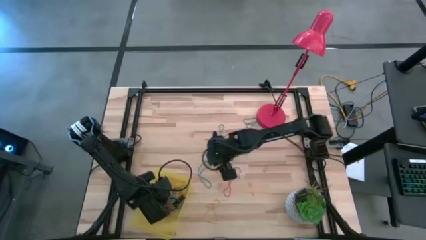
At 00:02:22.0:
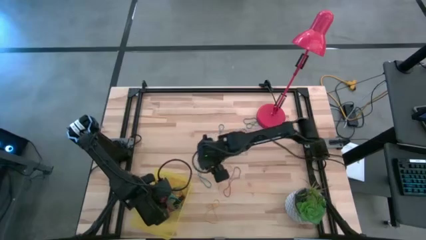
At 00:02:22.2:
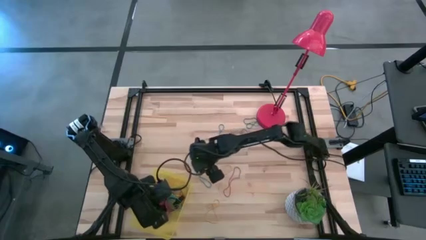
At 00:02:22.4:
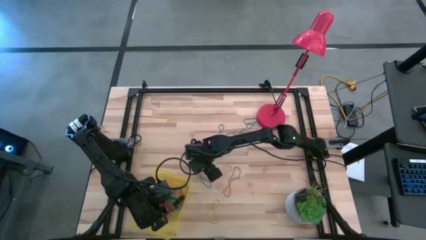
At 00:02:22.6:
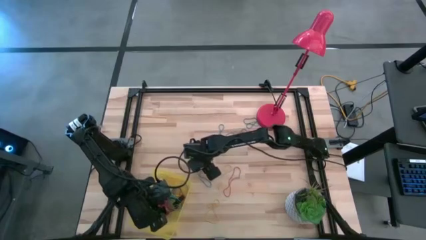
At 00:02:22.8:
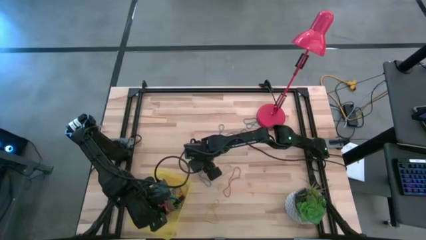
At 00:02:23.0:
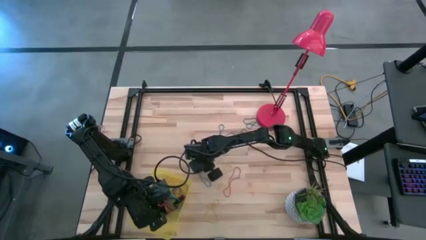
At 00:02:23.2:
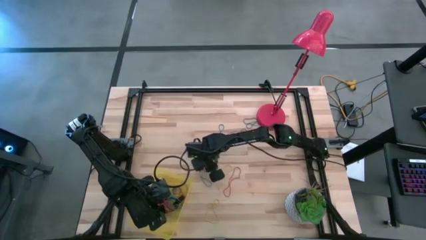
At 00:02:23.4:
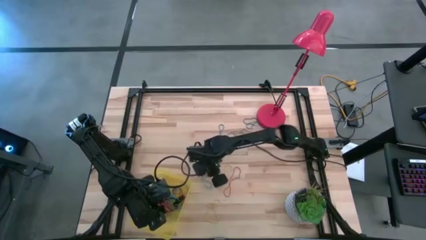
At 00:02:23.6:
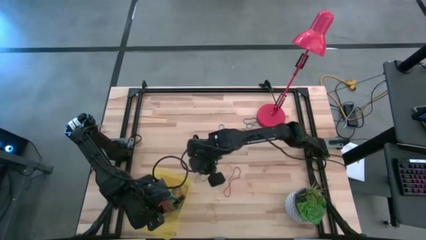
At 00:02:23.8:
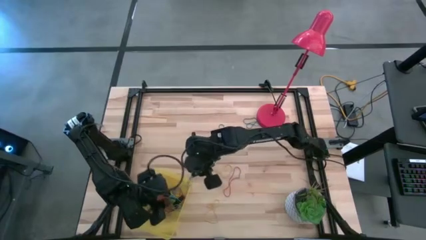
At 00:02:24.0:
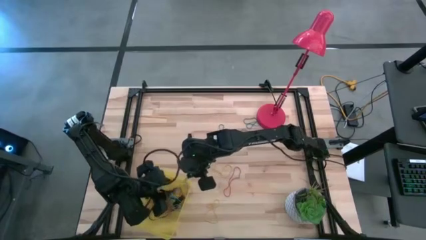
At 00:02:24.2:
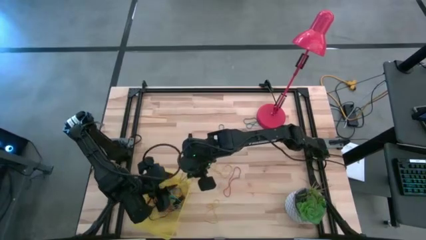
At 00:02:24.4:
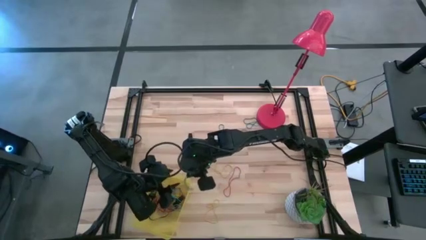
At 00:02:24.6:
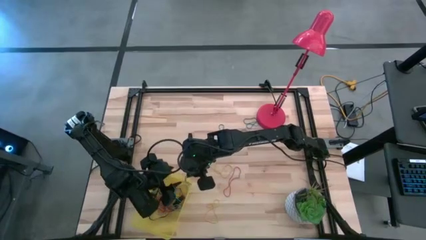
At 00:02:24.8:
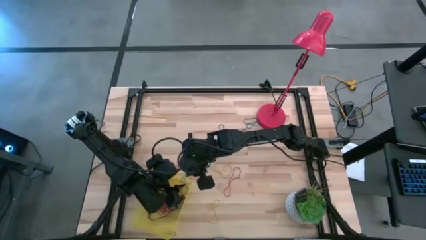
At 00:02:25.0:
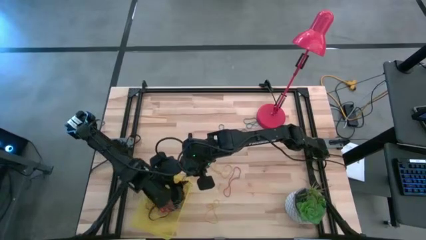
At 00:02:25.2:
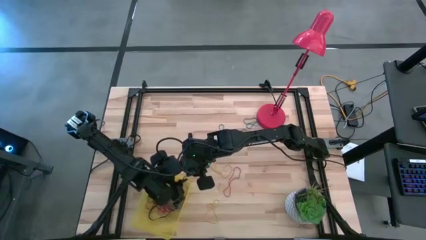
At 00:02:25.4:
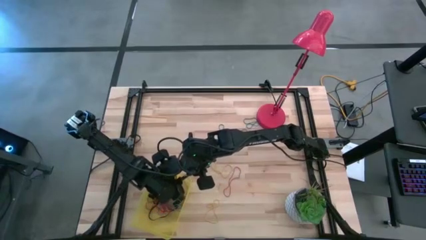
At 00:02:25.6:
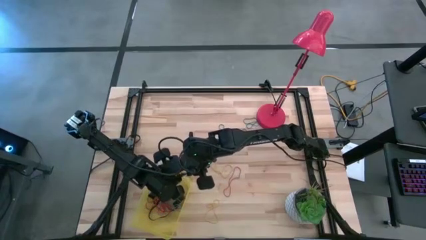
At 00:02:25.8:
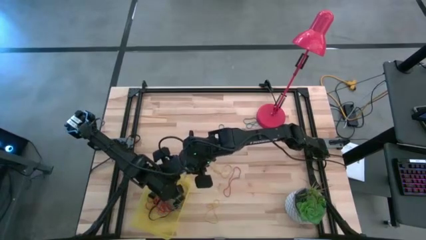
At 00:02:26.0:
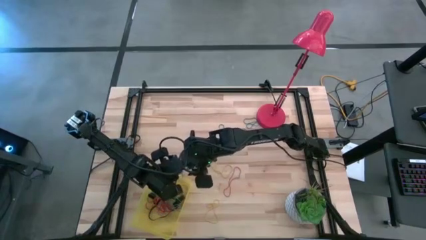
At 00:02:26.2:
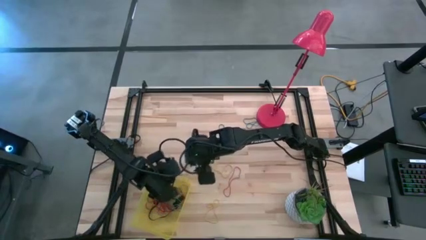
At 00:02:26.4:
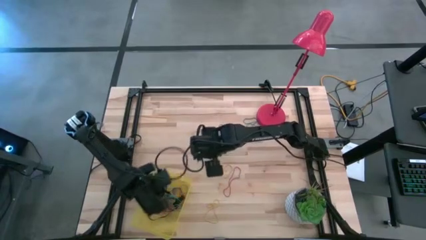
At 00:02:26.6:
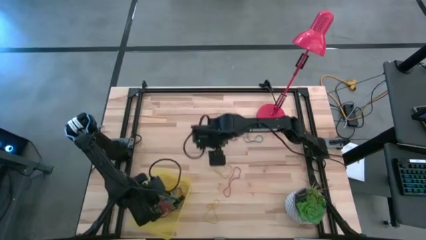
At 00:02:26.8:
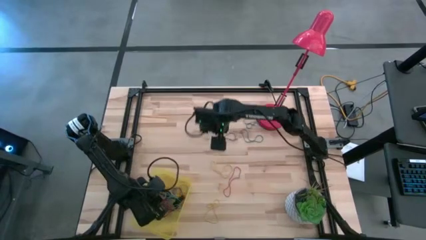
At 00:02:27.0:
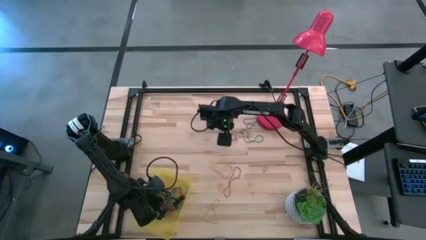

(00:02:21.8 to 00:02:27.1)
Task: Pick and place rubber bands into bin
Put the blue rubber band into the bin

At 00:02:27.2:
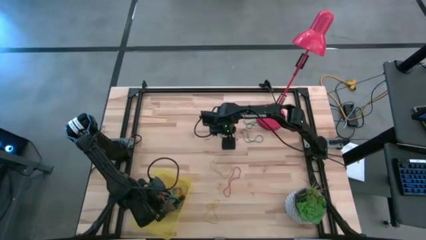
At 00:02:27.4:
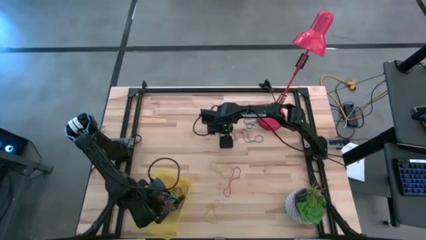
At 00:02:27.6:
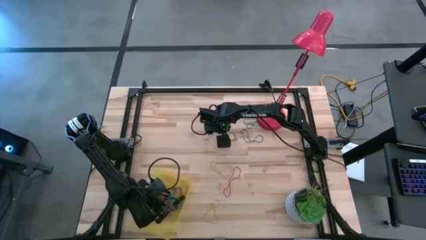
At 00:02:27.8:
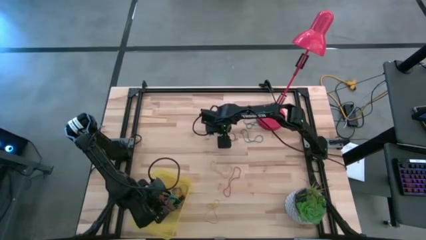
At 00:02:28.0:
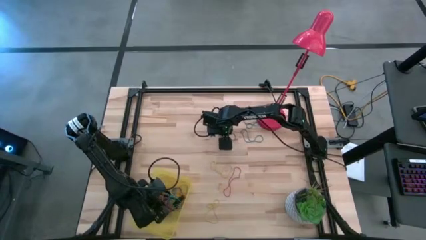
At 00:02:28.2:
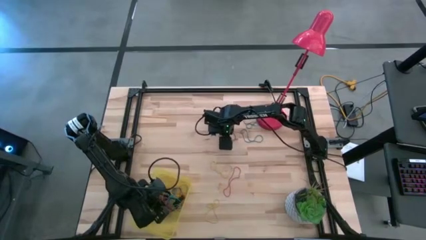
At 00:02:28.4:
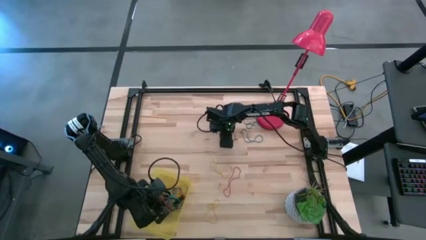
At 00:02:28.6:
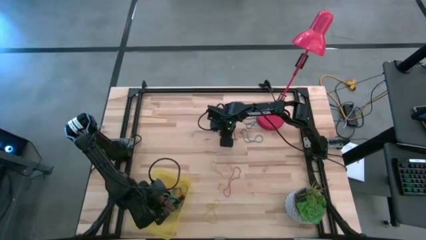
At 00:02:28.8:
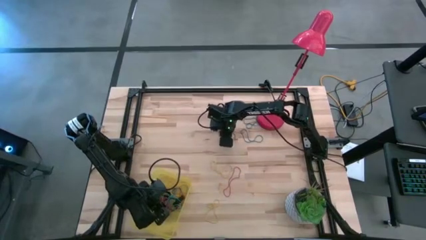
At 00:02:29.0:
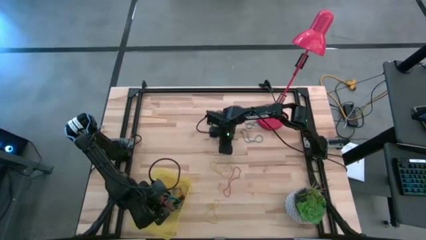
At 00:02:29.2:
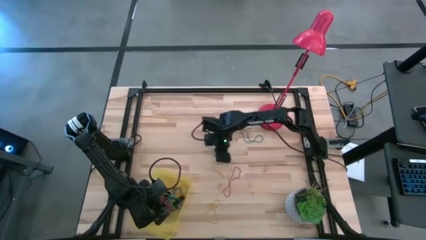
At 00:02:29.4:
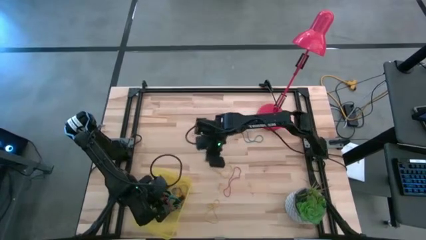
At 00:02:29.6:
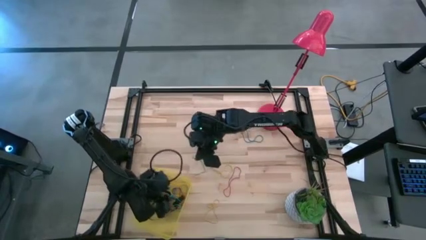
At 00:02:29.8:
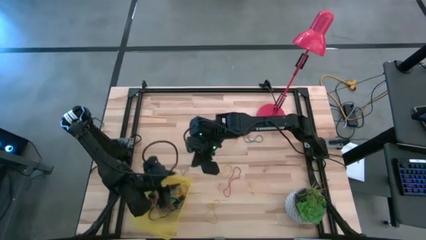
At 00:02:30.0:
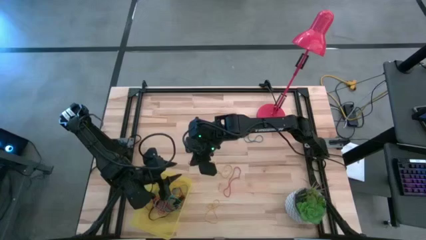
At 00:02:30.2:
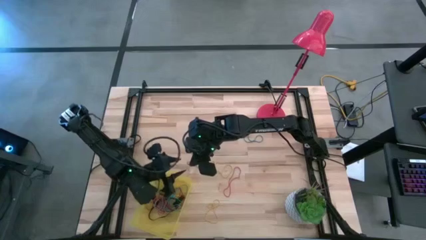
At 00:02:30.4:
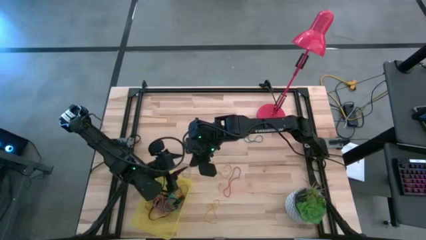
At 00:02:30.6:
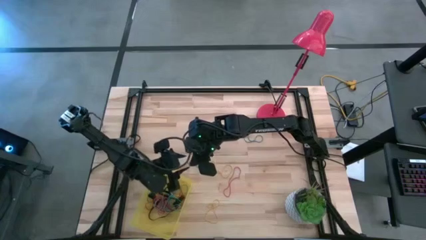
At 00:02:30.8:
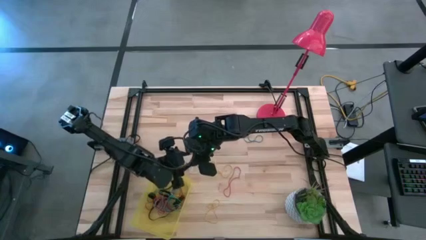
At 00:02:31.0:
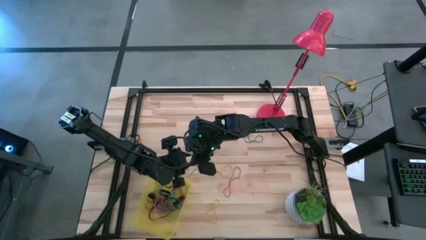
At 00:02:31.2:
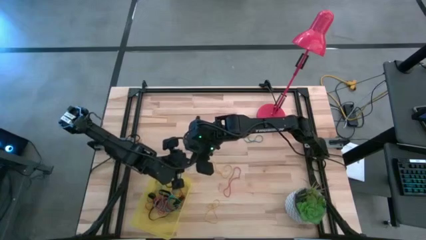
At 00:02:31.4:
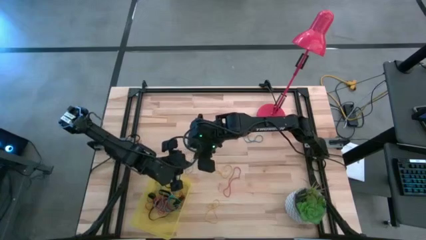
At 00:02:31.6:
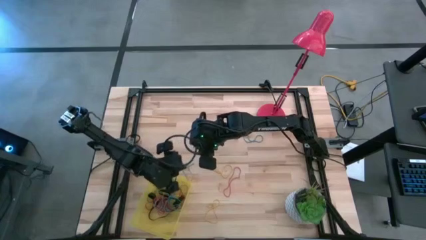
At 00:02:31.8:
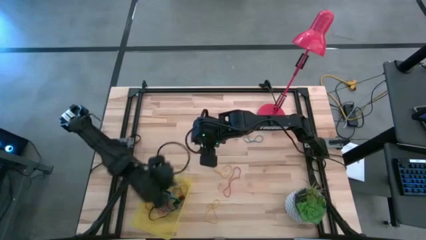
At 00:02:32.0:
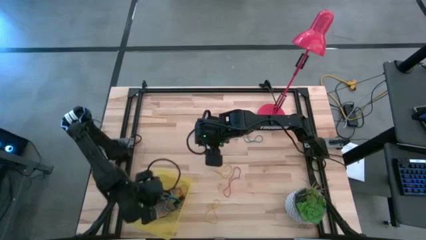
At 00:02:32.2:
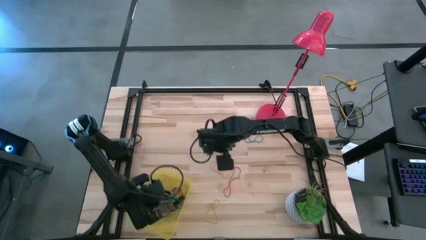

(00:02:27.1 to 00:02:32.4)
Put the blue rubber band into the bin

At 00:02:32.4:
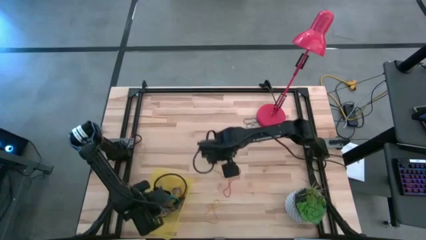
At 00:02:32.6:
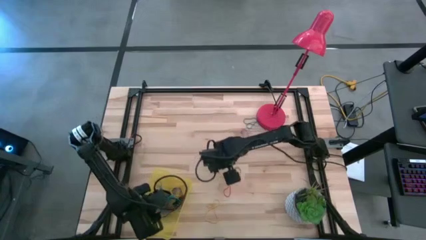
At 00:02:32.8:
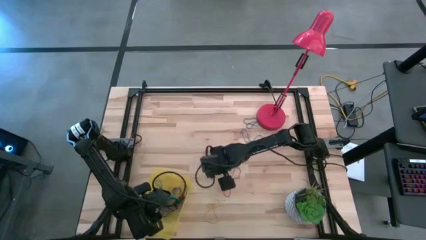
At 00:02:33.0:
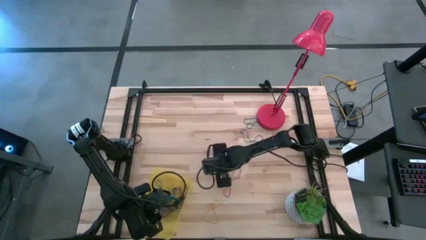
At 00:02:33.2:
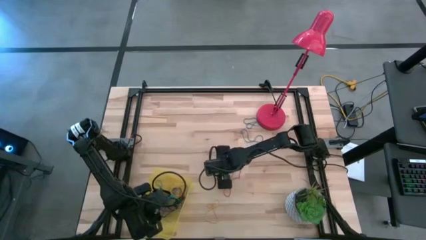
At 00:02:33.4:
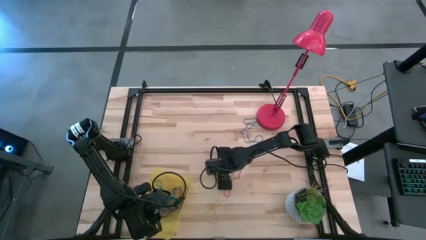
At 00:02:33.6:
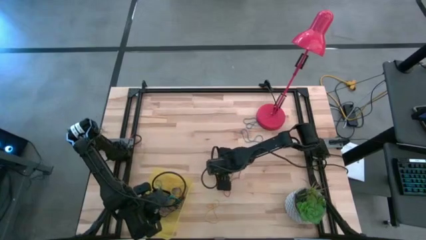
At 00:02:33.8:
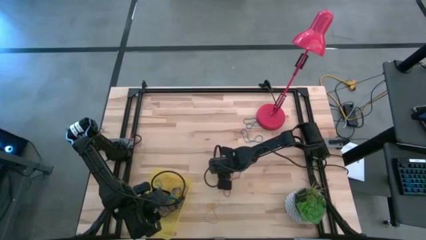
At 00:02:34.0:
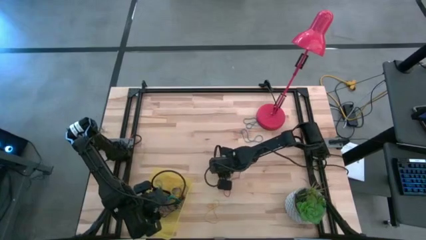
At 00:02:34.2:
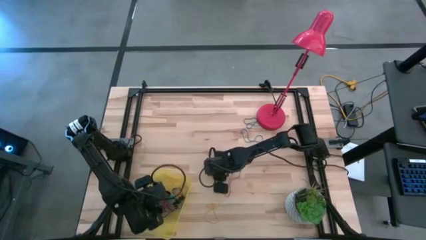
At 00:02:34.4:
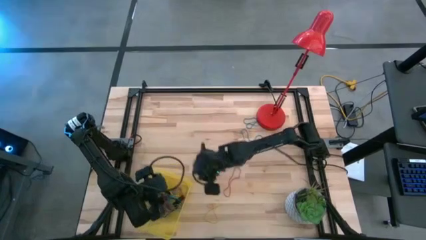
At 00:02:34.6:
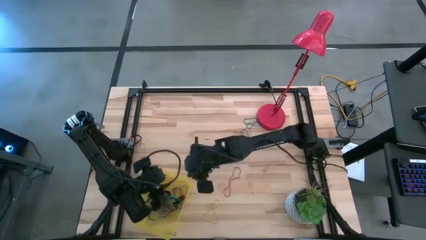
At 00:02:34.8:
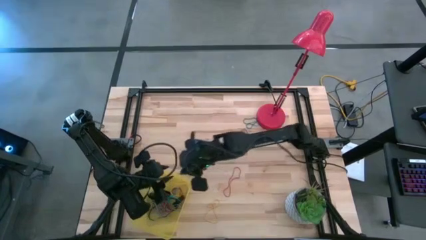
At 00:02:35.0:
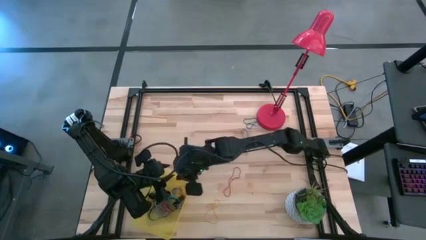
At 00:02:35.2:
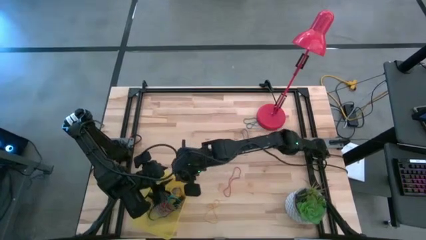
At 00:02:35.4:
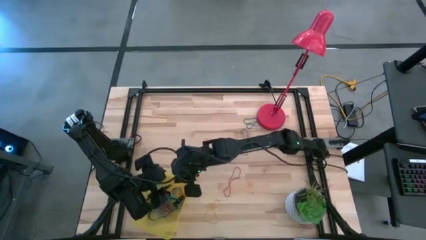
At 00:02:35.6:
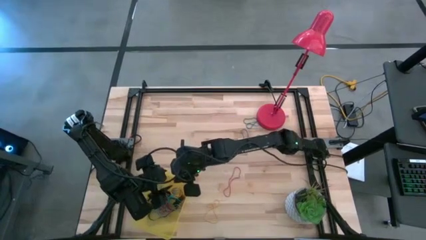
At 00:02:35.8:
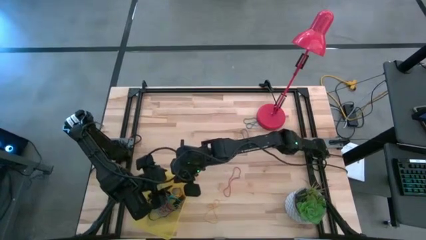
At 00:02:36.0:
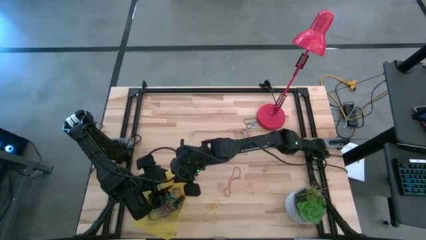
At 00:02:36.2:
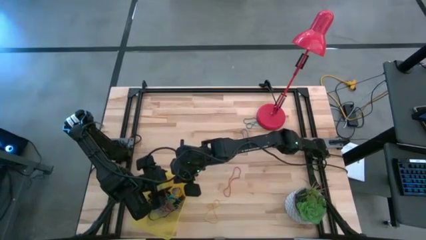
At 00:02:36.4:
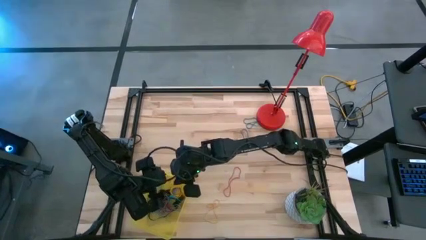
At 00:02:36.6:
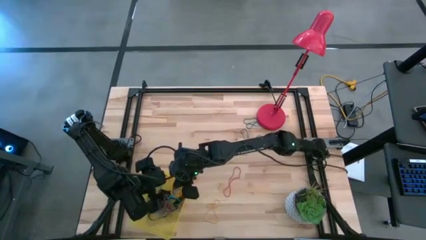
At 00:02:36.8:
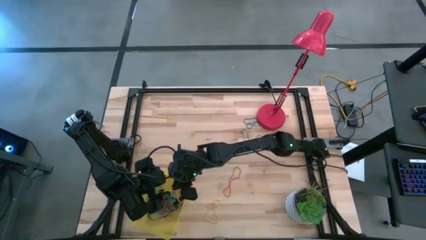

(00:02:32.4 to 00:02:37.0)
Put the yellow rubber band into the bin

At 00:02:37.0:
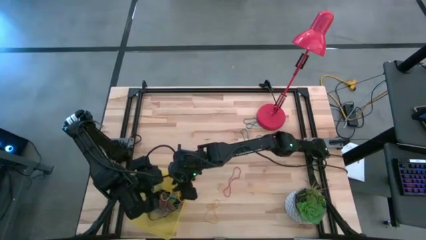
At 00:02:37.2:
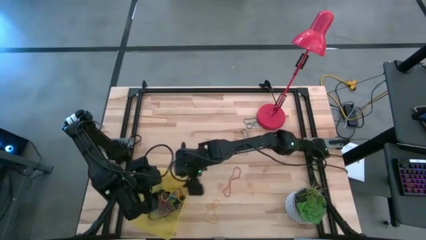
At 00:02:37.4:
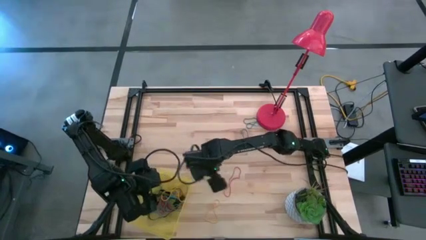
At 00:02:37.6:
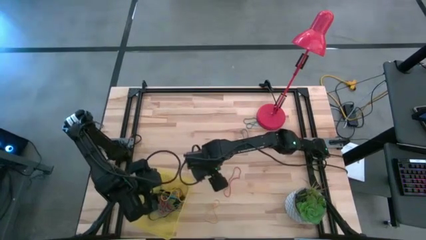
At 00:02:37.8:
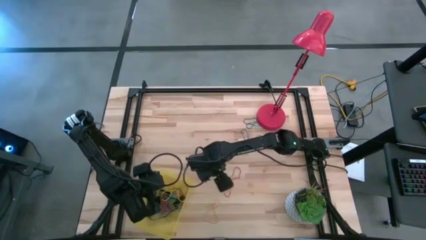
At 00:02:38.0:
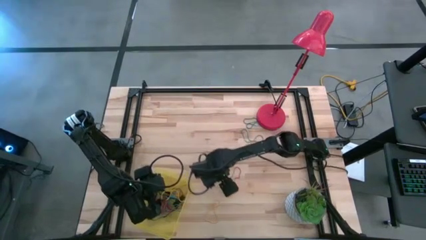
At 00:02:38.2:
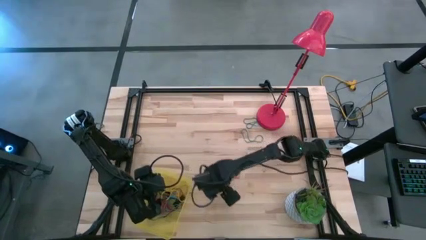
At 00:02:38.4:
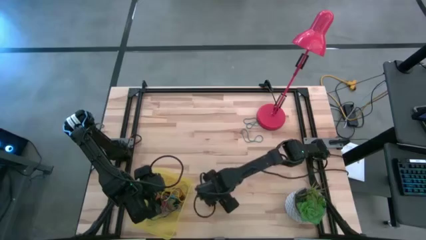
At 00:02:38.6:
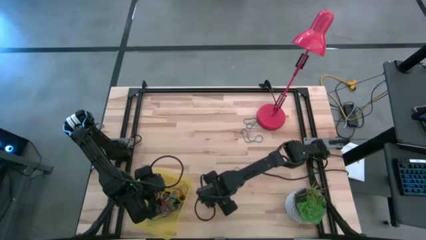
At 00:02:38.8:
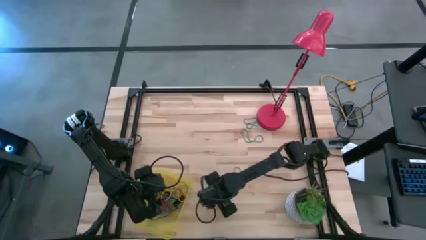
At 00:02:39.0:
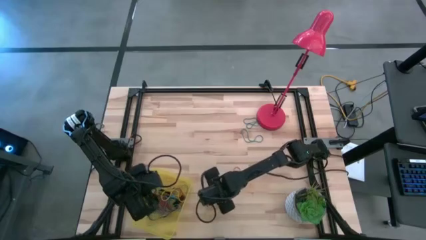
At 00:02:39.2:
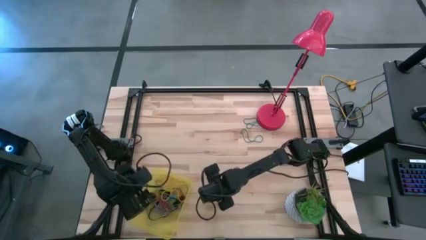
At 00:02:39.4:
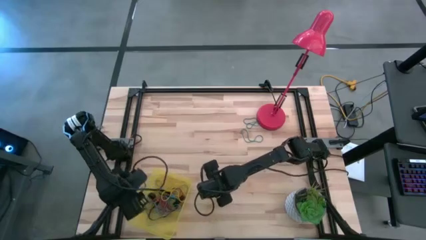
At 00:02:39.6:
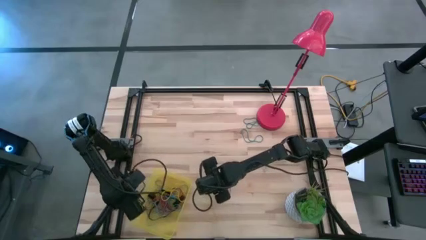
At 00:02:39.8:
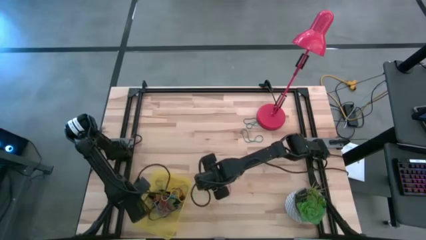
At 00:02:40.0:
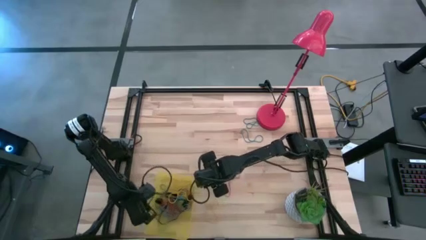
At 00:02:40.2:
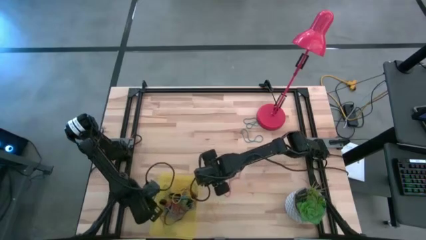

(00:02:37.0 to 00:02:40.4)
Adjust the bin
